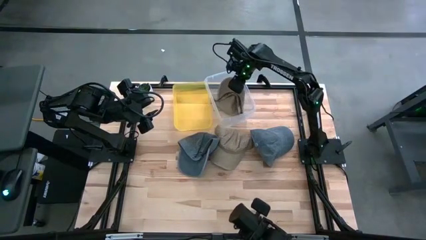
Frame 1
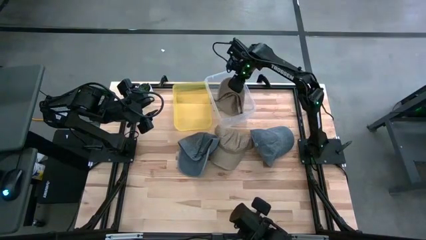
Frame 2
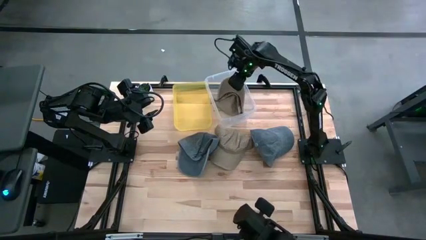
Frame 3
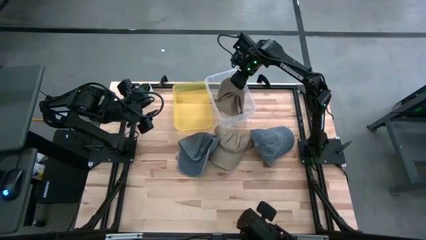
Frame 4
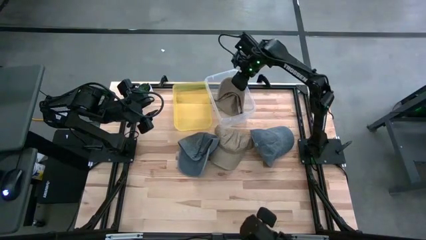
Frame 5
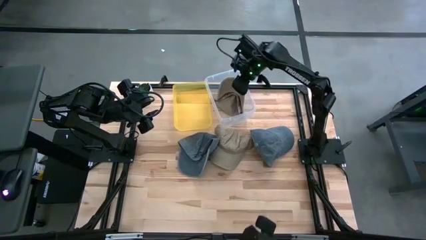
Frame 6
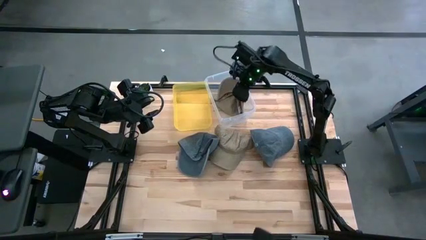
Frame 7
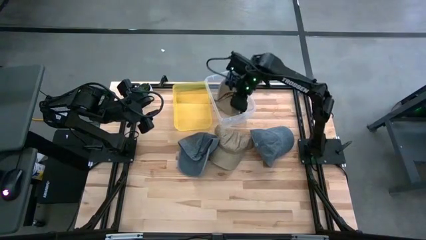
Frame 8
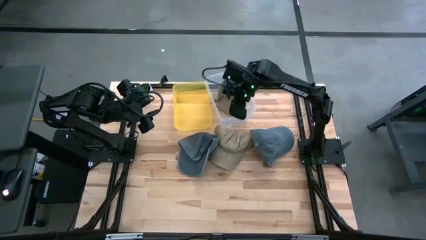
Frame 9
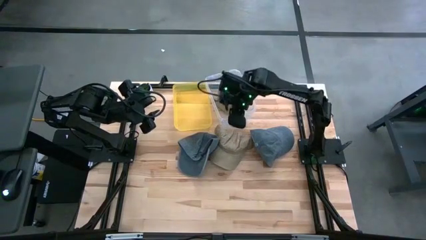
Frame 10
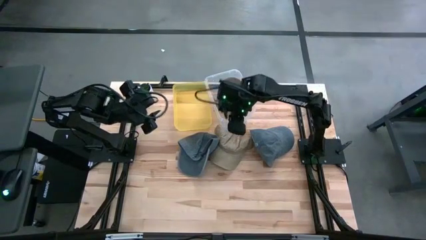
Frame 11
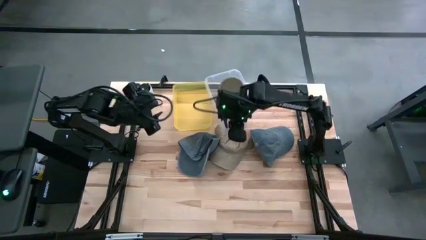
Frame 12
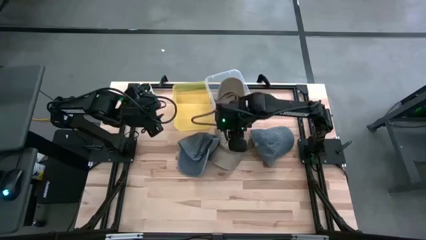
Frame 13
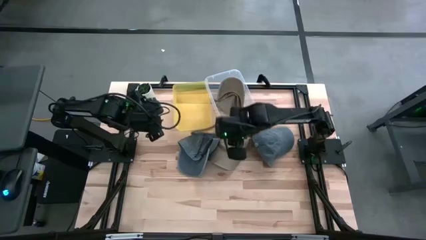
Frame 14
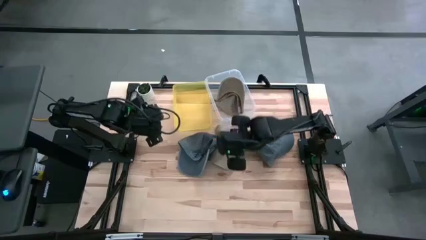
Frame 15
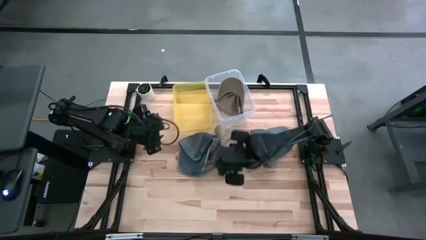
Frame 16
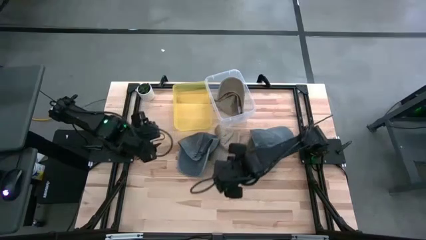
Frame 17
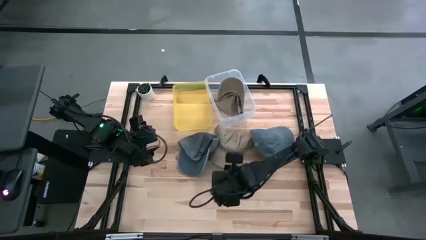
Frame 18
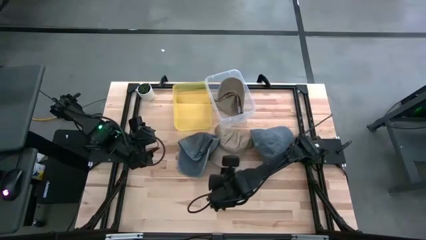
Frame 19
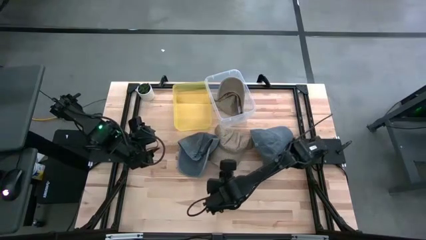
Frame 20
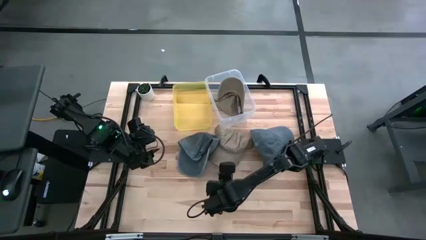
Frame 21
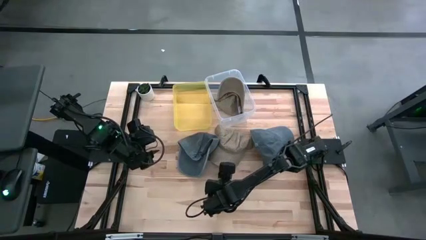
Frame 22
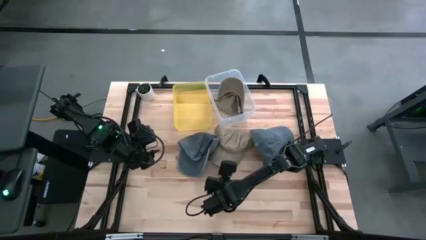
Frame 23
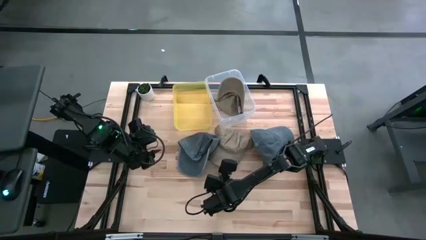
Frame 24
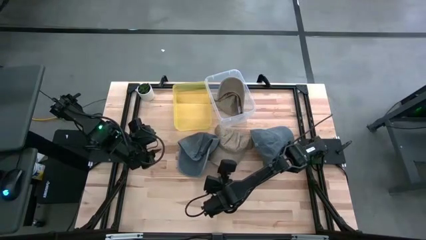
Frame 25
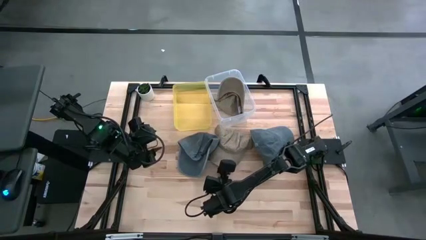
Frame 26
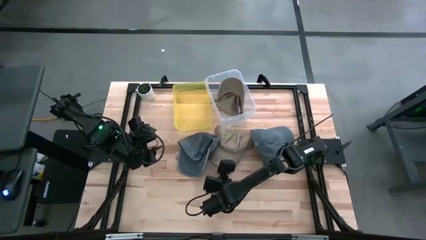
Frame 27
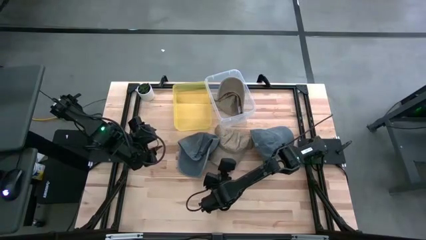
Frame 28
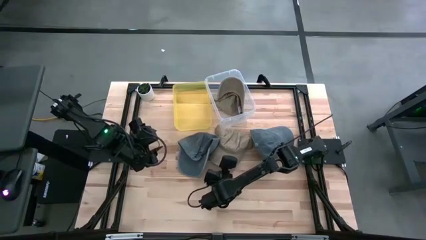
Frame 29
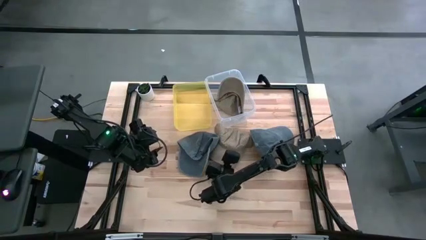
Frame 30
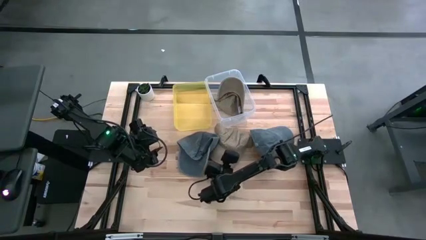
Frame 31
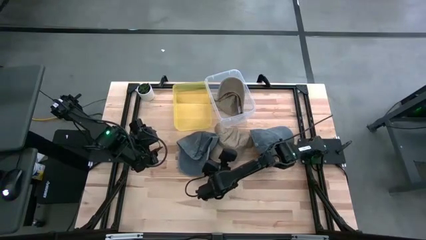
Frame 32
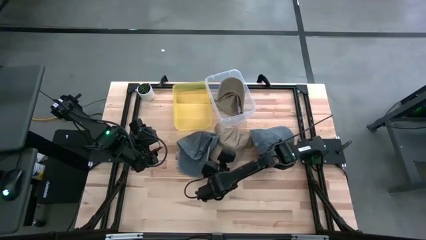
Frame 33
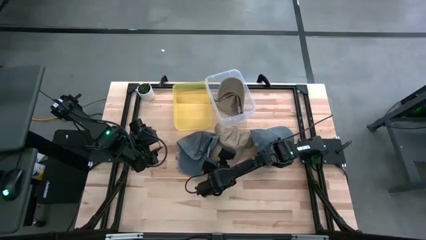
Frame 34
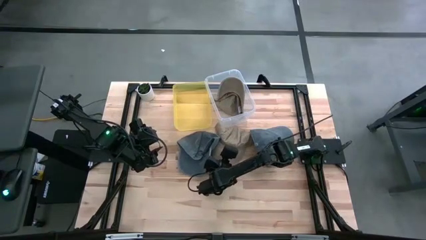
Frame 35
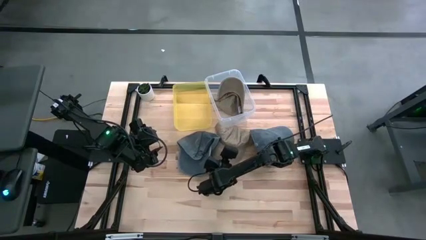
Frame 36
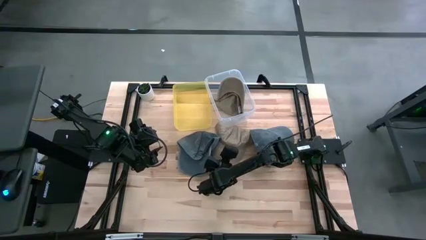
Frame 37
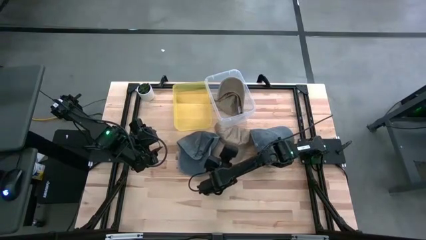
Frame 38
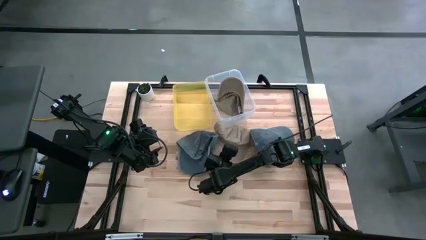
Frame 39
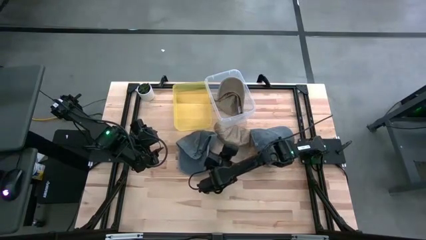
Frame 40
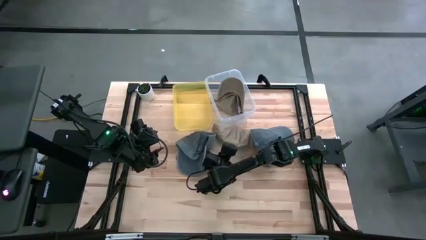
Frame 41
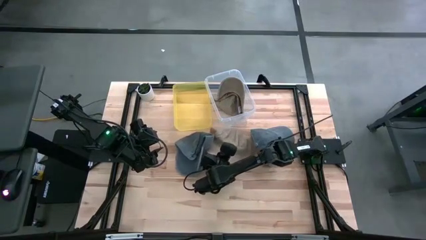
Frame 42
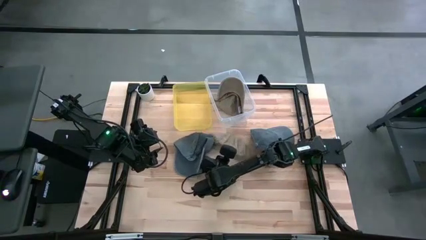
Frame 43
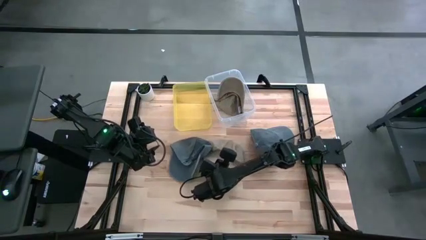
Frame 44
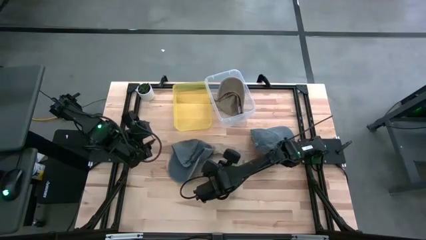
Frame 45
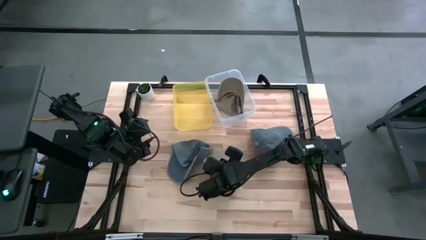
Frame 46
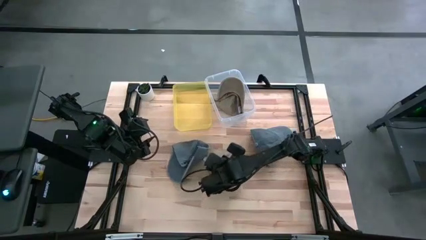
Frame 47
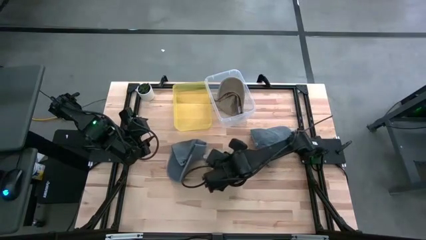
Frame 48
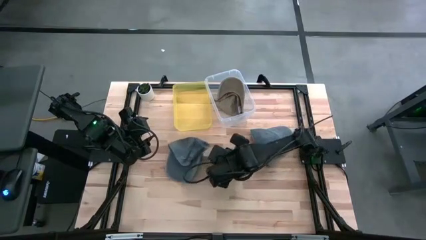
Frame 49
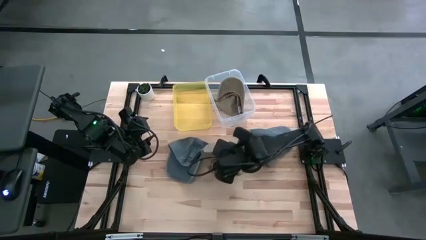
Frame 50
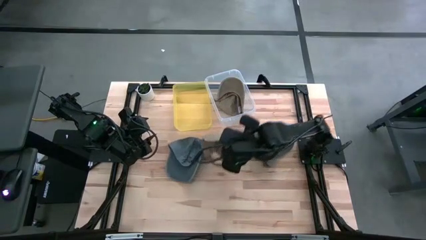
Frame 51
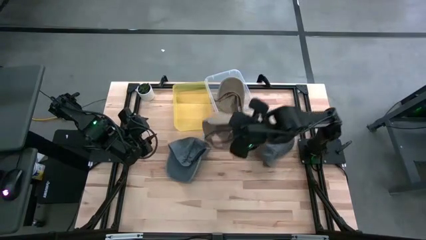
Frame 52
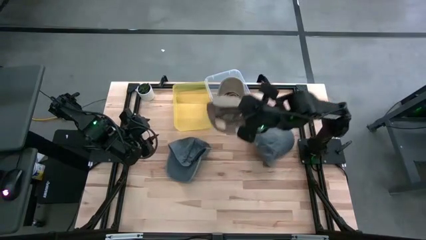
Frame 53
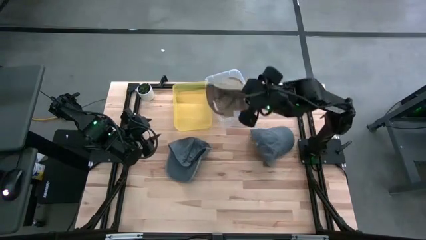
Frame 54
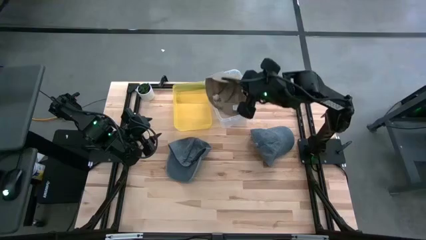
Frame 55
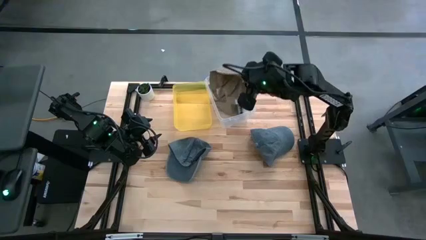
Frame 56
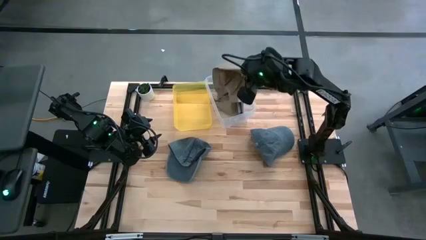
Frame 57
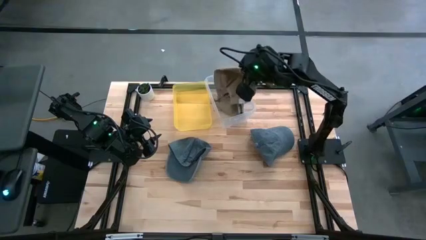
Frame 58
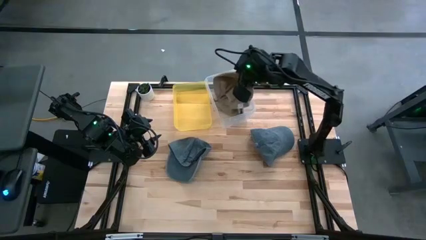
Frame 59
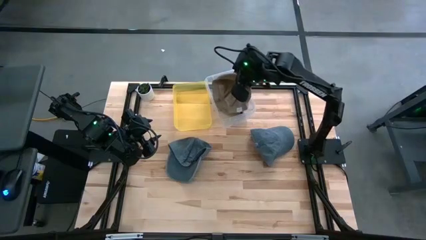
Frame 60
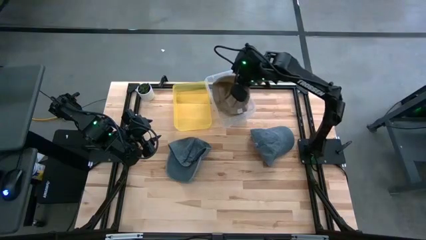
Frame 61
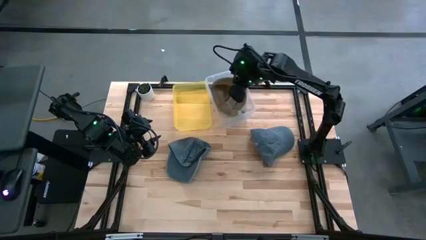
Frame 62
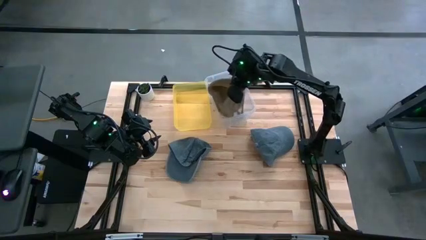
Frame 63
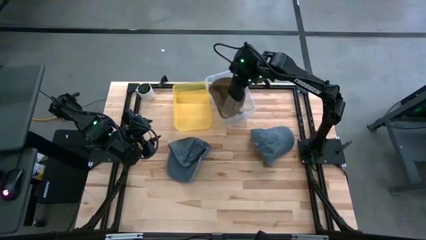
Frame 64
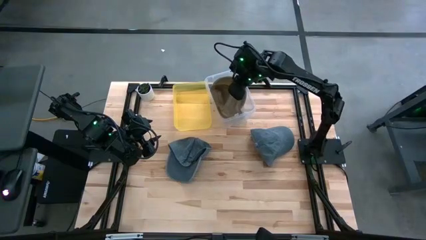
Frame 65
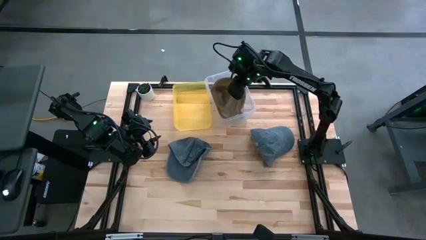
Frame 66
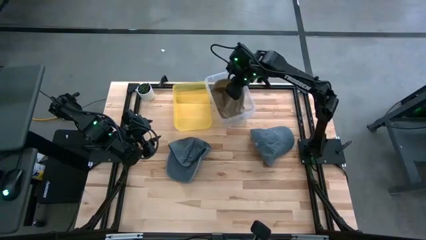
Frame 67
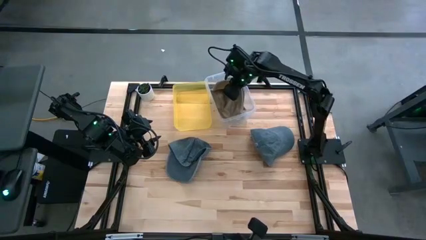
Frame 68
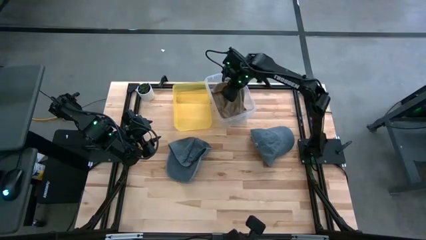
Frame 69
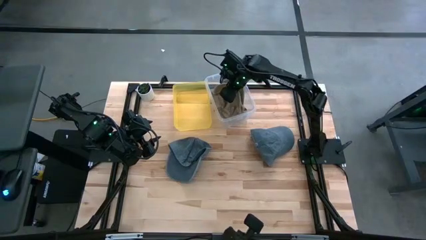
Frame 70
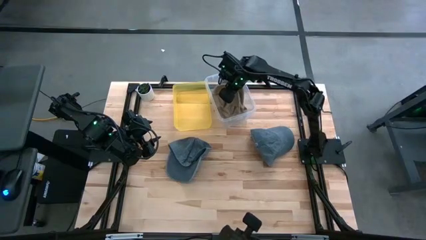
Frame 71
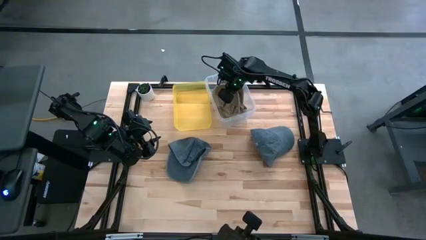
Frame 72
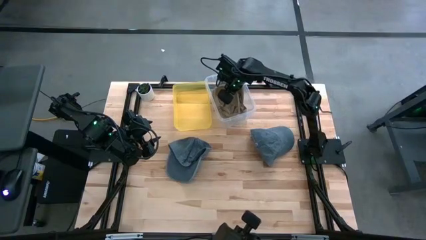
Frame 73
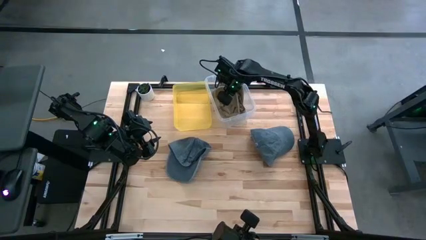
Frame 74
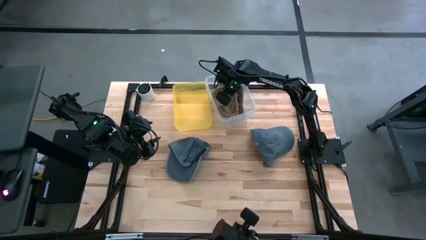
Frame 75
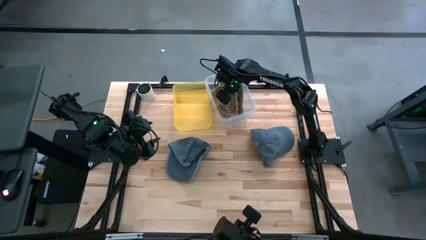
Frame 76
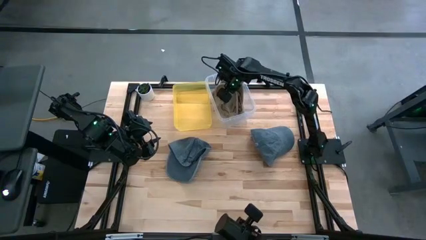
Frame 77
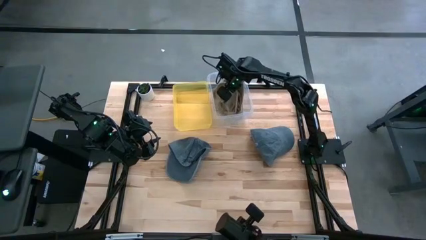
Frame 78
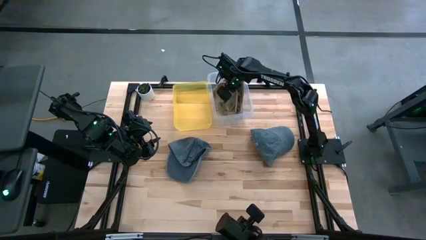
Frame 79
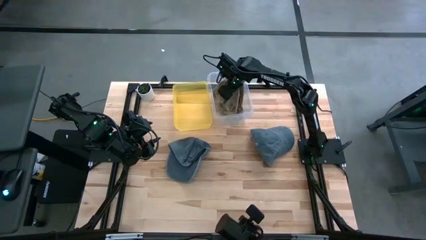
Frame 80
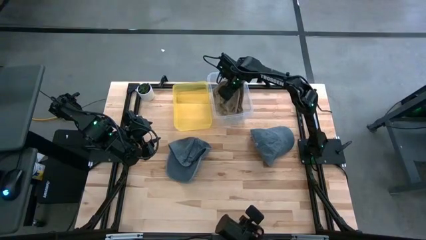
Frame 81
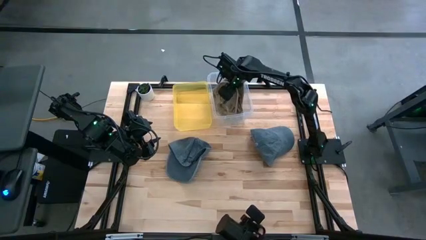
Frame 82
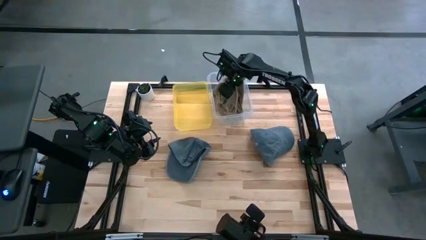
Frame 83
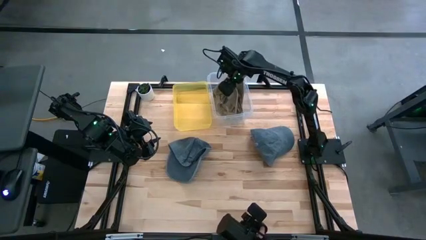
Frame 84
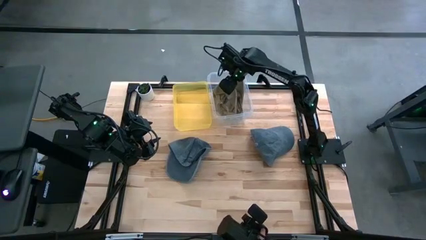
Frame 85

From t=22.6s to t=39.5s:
Task: Pick & Place hat
Put the brown cap into the transparent bin
